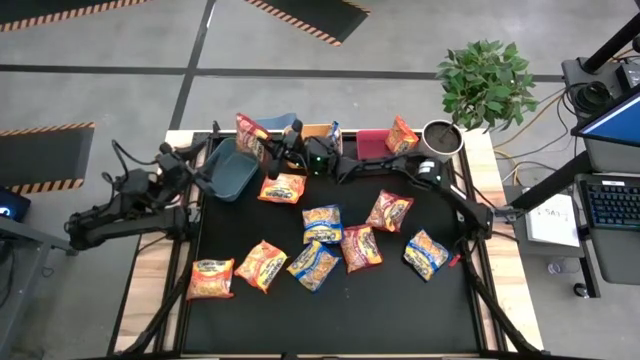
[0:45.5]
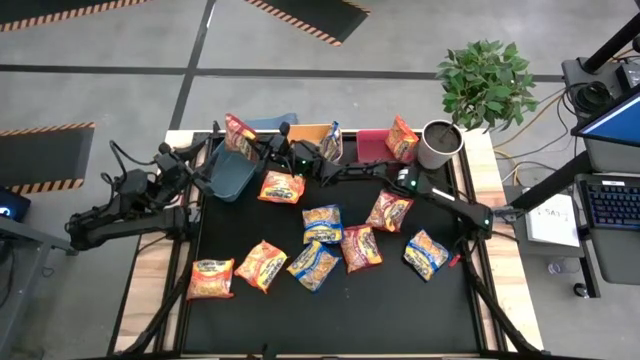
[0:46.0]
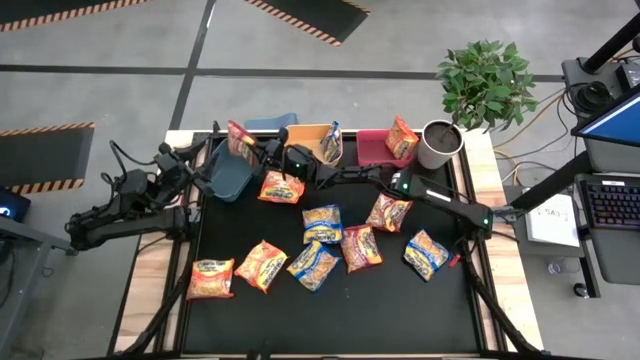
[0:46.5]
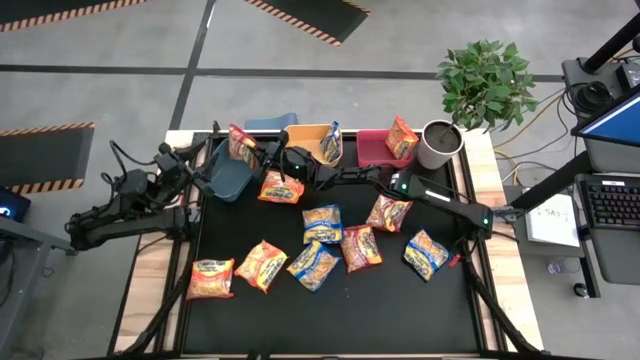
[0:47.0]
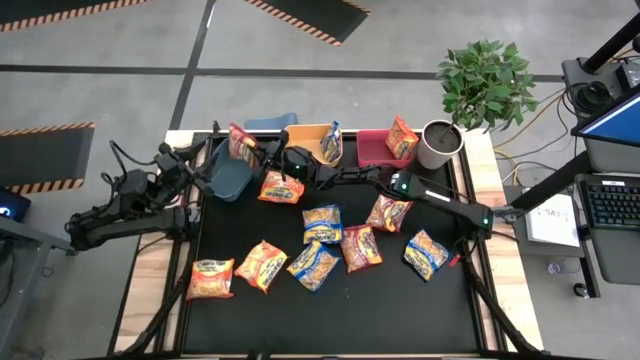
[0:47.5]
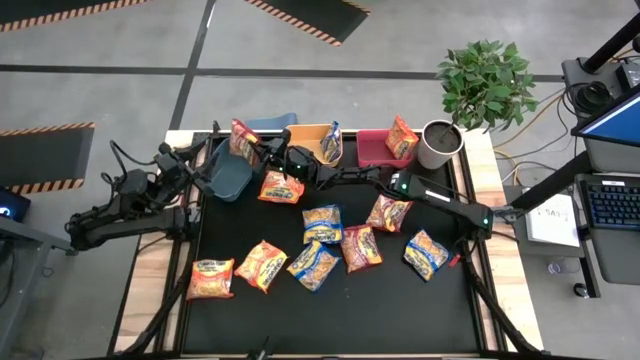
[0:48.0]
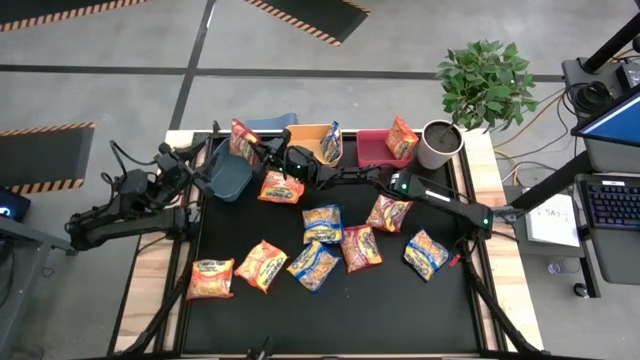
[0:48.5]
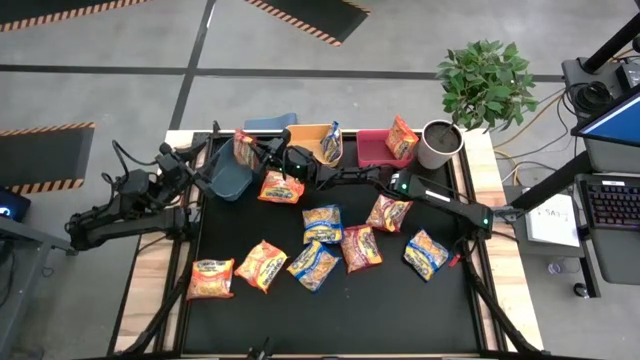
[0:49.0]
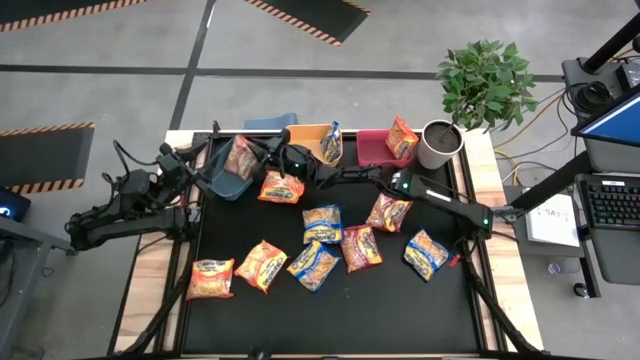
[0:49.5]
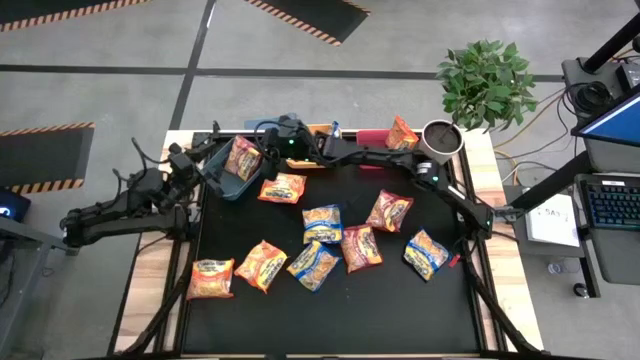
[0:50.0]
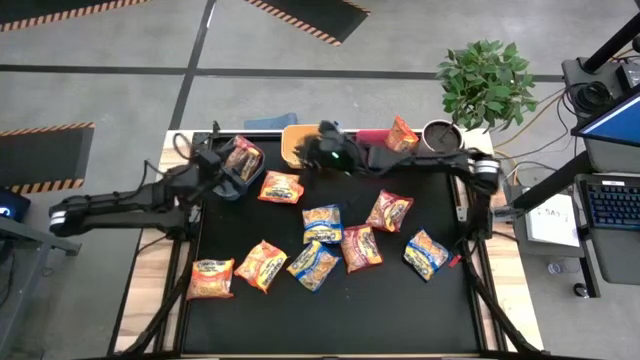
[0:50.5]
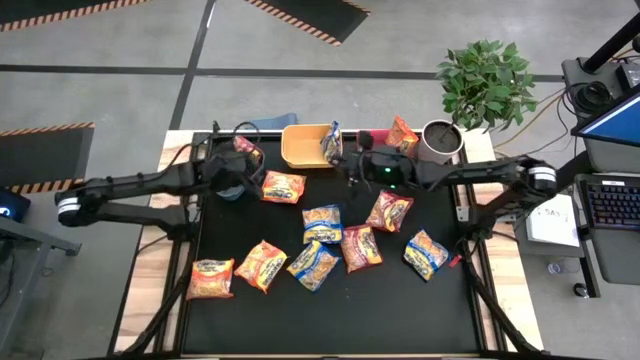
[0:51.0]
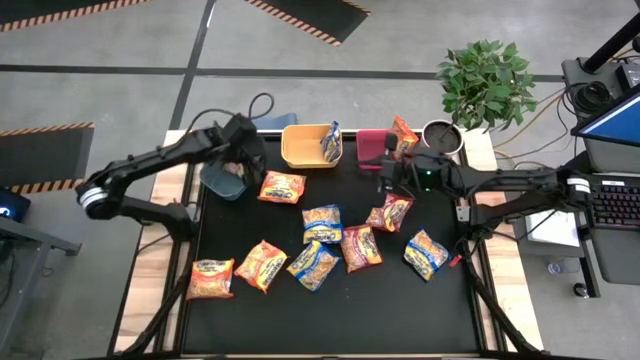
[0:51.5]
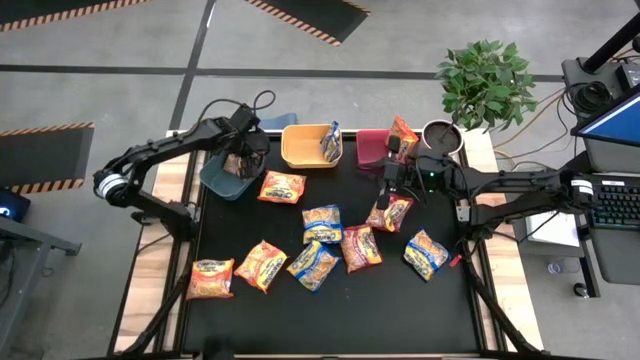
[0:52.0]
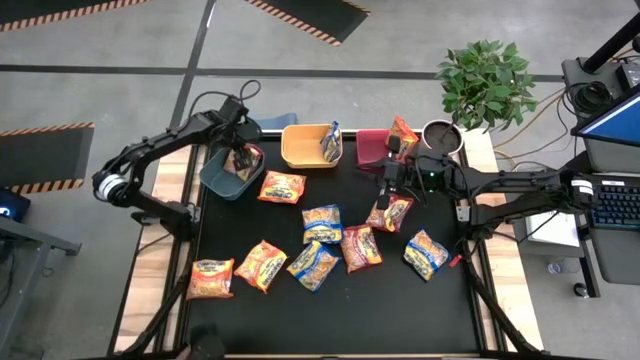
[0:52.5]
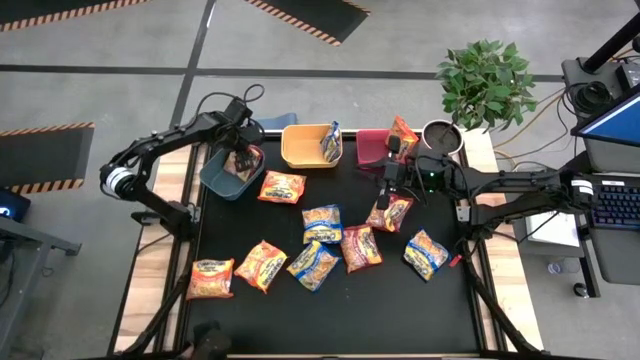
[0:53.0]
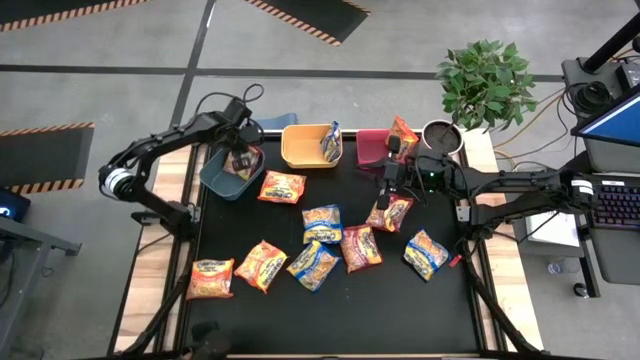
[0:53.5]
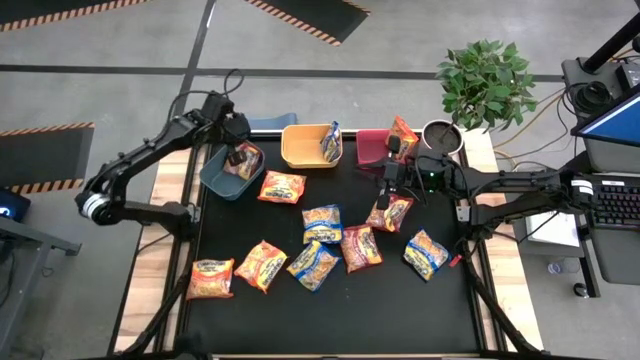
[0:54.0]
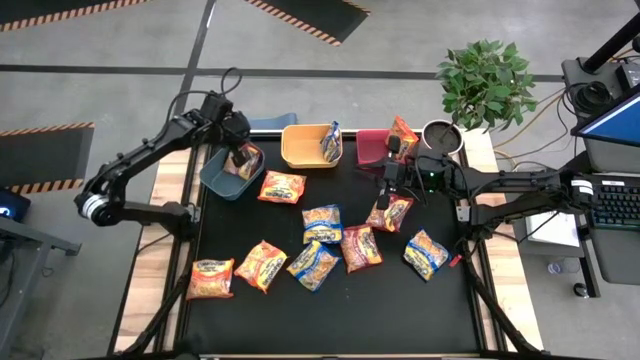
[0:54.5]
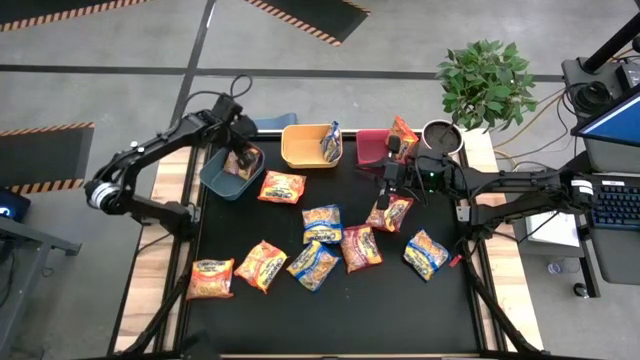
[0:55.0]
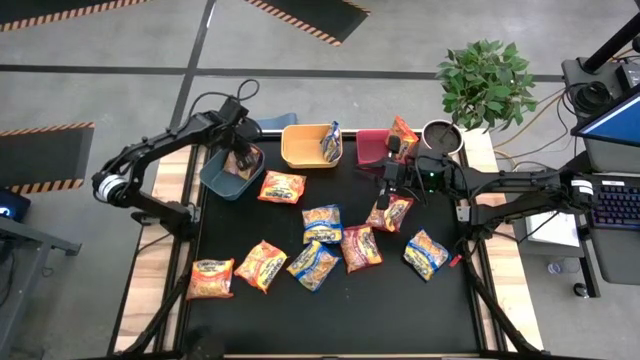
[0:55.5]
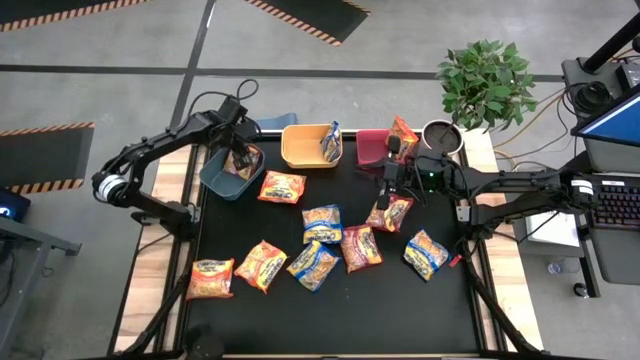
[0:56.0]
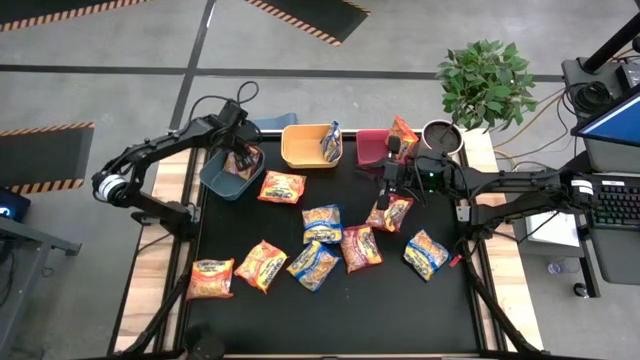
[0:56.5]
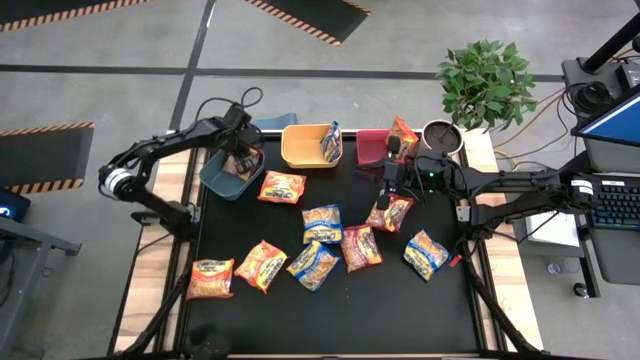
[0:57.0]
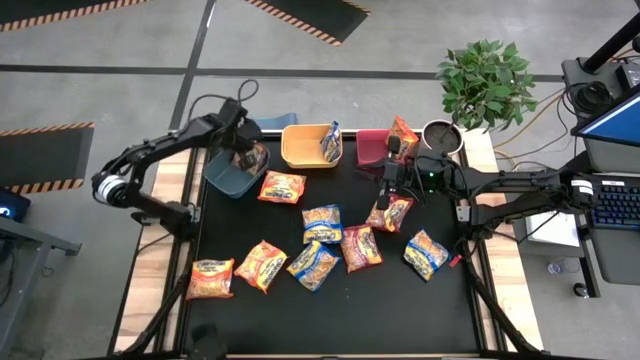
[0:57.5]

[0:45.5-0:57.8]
Task: Sort Maruchan noodles
Put the red noodle into the blue bin

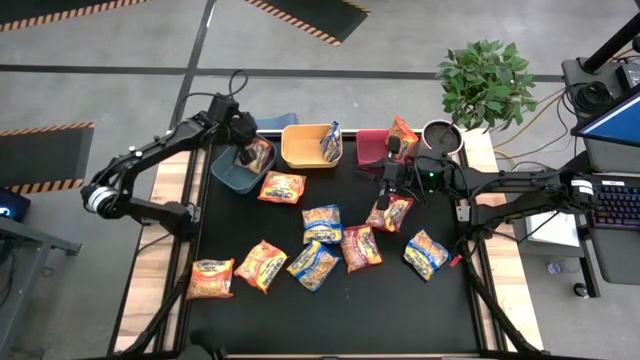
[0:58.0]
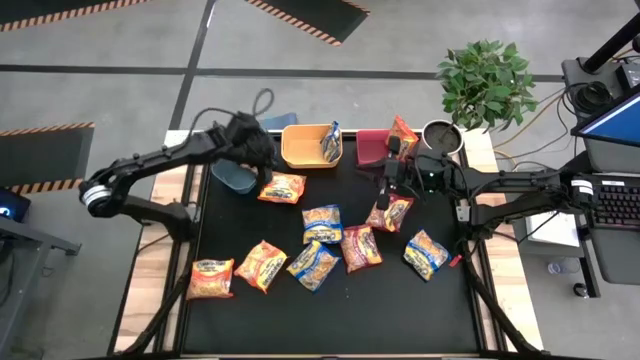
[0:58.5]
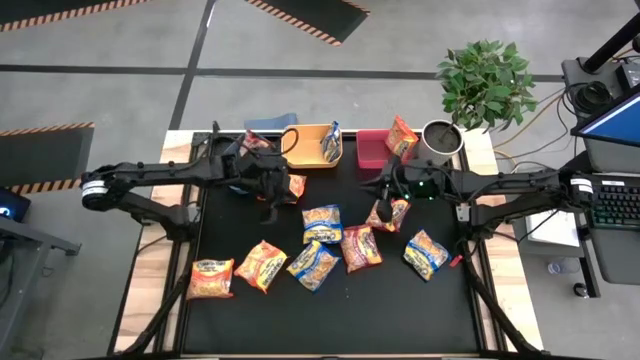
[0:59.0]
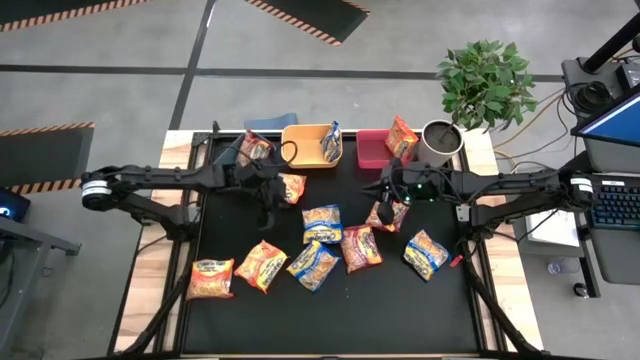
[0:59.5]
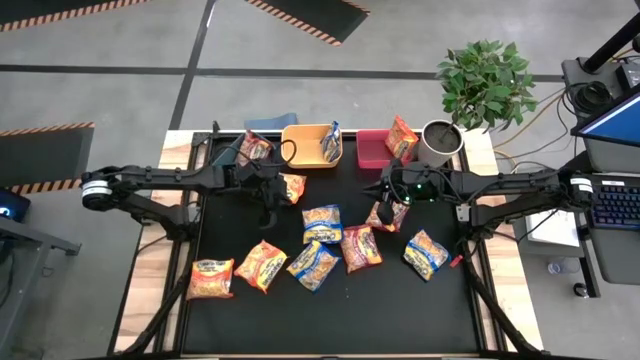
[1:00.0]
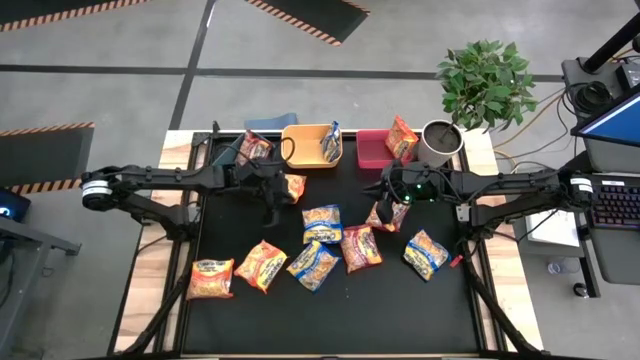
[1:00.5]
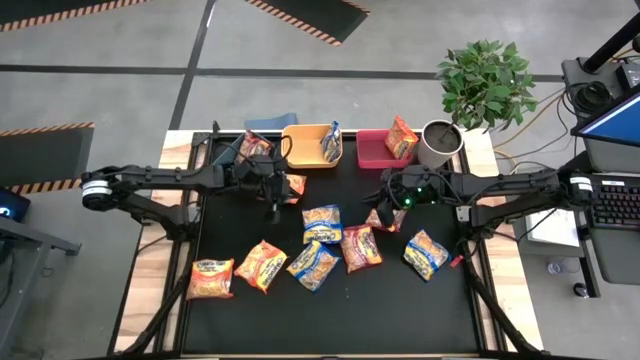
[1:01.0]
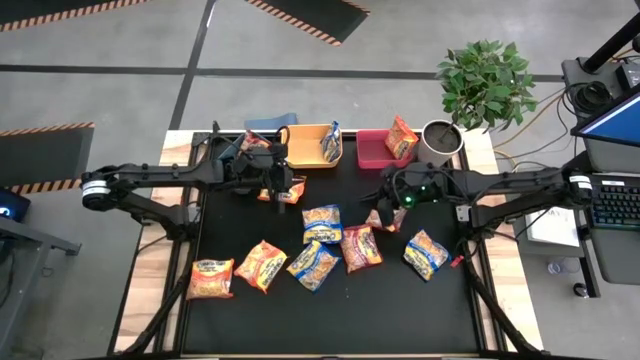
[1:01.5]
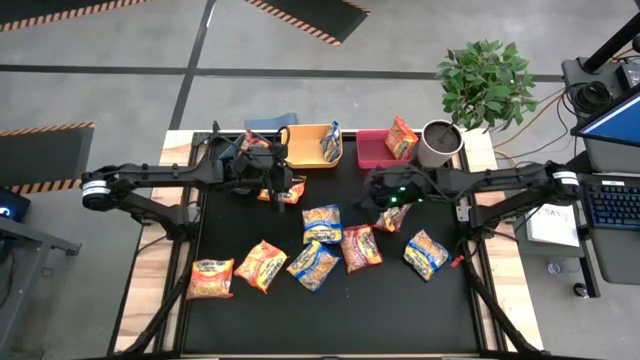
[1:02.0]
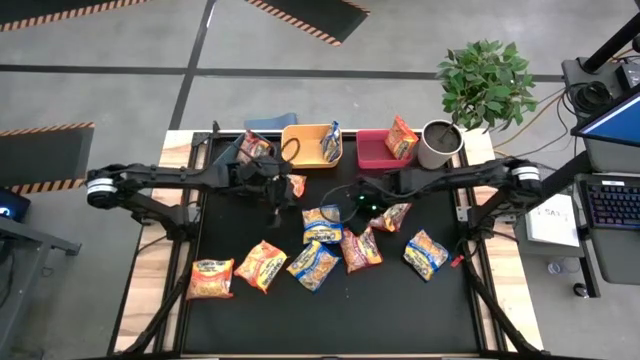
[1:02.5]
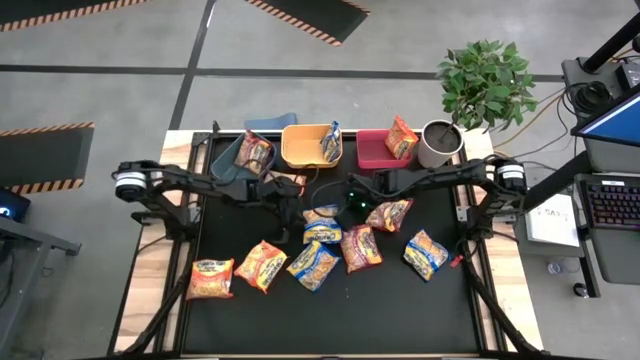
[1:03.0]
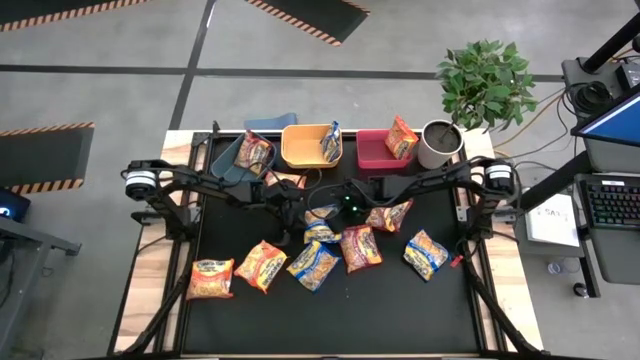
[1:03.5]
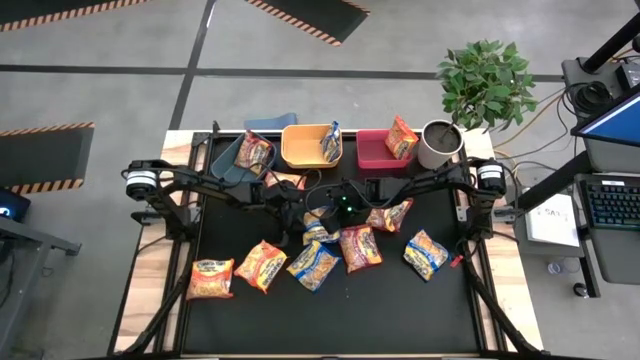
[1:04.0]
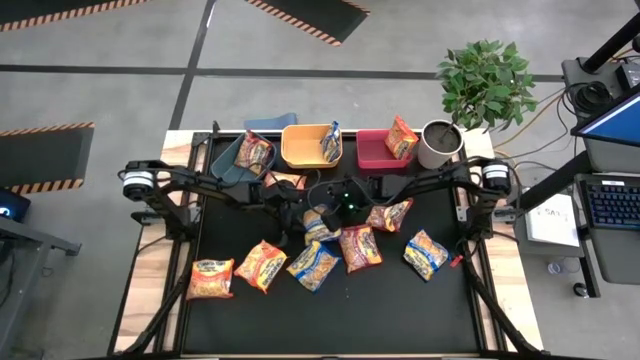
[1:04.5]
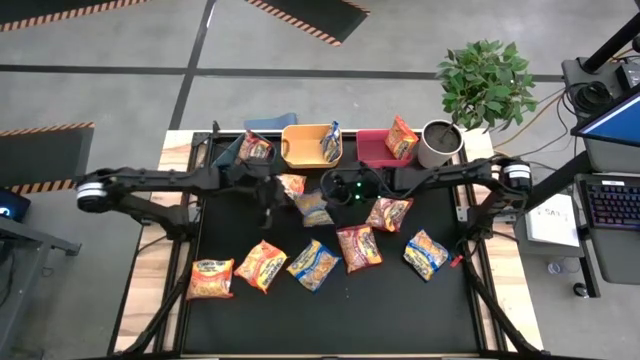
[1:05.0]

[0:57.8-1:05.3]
Put the blue noodle pack into the yellow bin

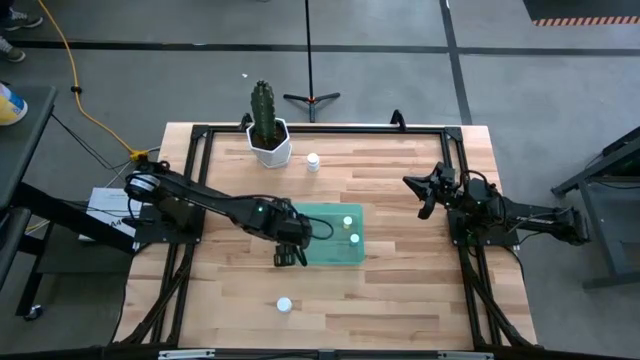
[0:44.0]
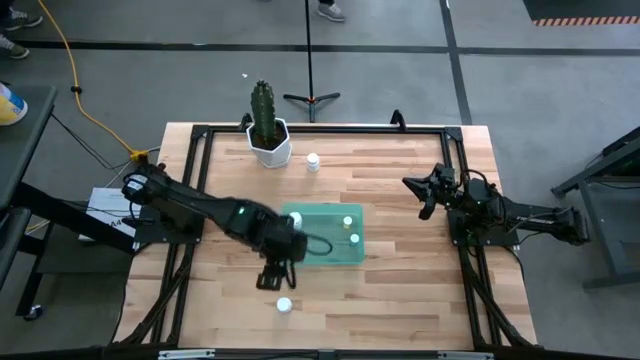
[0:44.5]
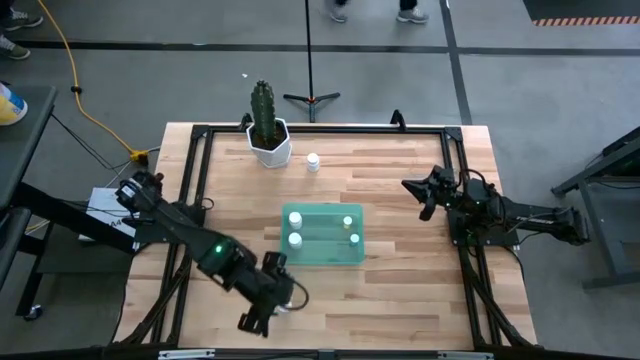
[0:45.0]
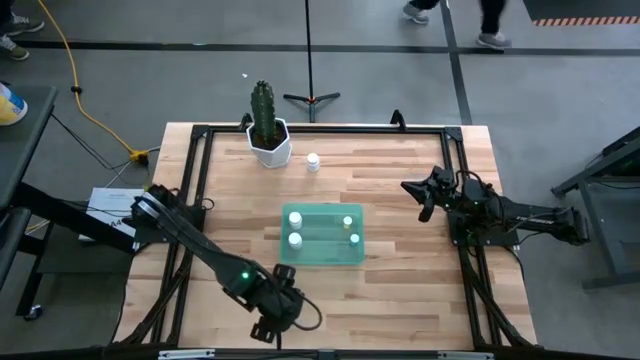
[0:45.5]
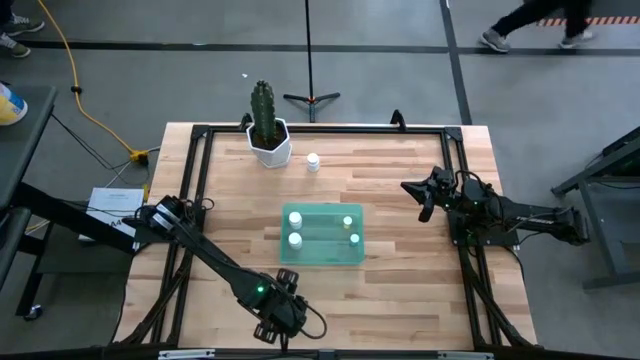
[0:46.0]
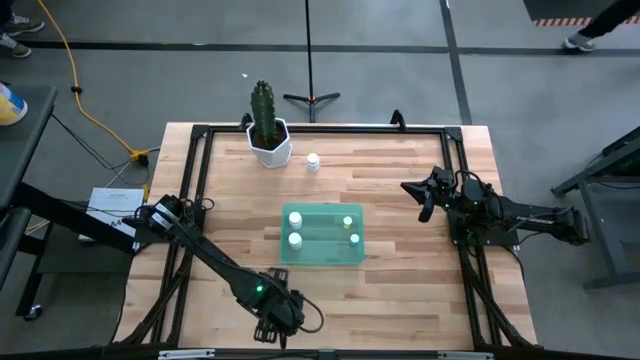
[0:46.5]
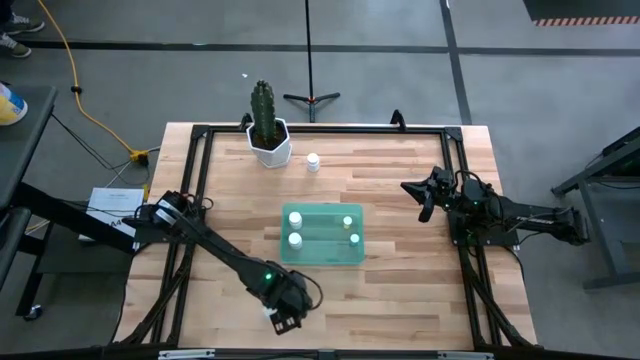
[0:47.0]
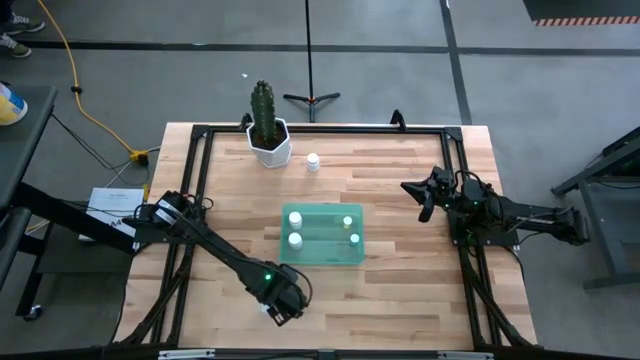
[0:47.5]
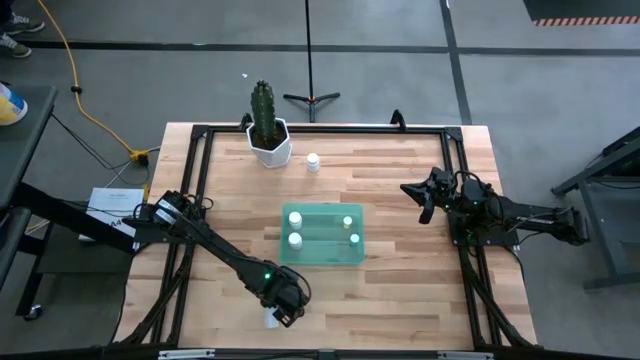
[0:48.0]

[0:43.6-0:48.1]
Task: Pick and place pill bottles into a basket
Put the bottom white pill bottle into the blue bin
